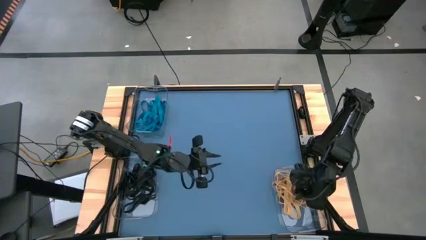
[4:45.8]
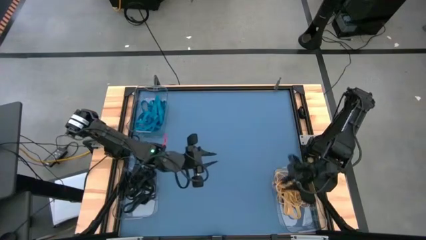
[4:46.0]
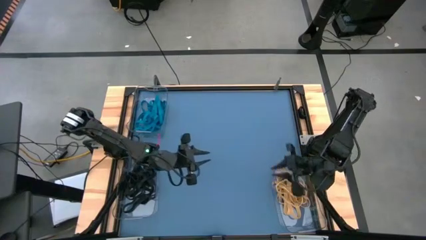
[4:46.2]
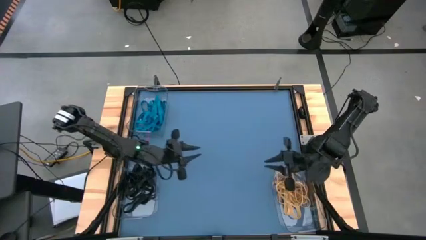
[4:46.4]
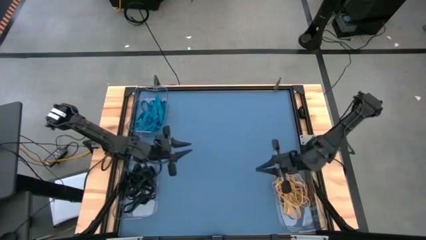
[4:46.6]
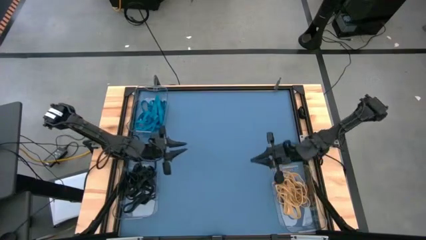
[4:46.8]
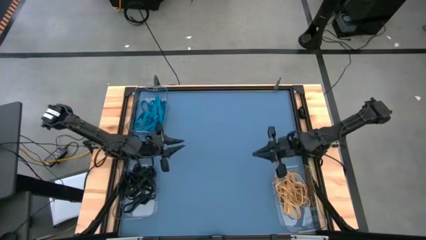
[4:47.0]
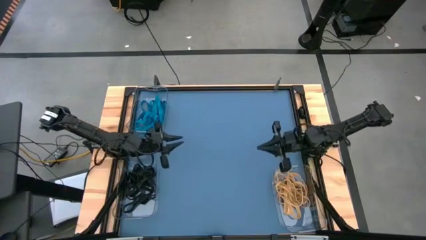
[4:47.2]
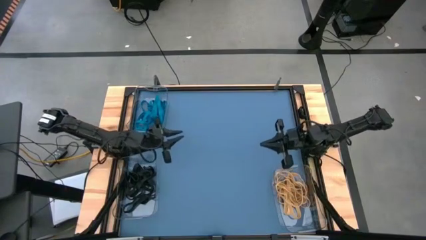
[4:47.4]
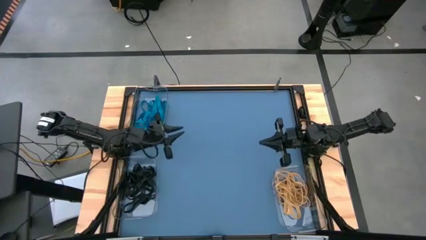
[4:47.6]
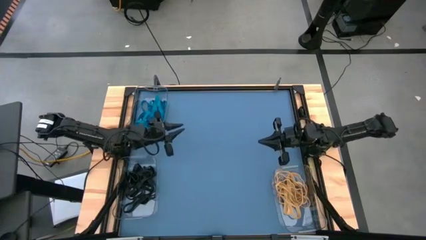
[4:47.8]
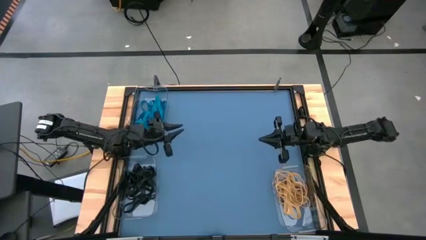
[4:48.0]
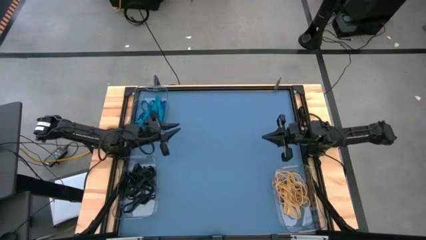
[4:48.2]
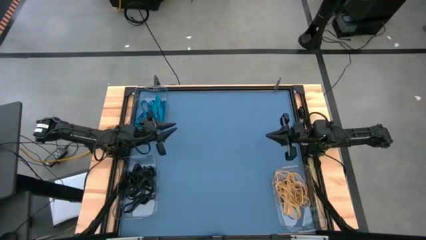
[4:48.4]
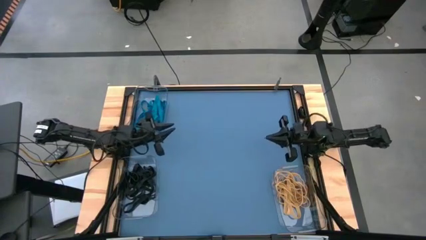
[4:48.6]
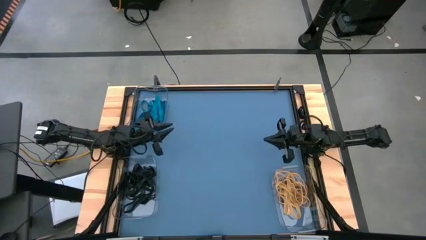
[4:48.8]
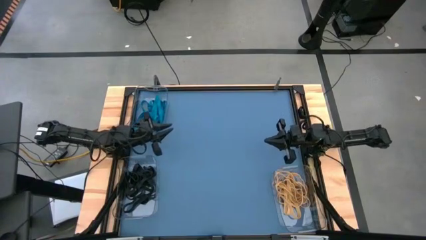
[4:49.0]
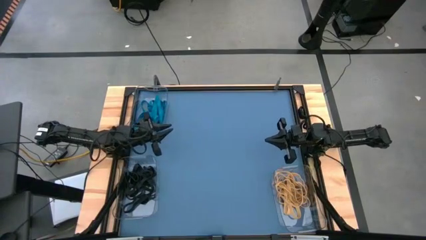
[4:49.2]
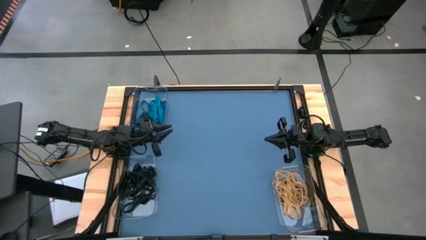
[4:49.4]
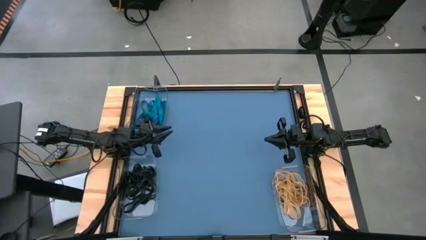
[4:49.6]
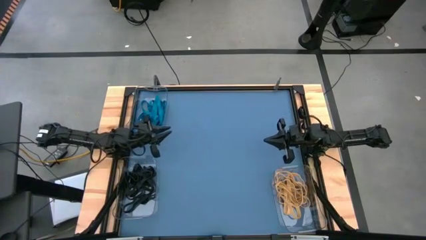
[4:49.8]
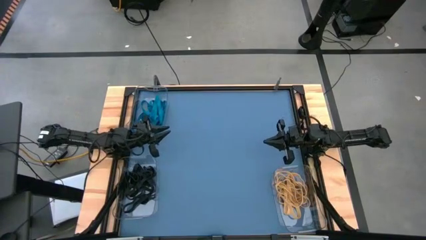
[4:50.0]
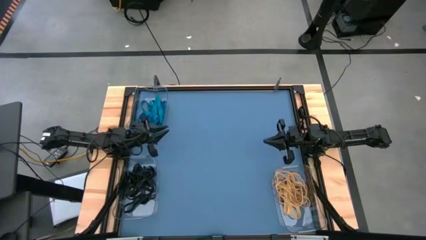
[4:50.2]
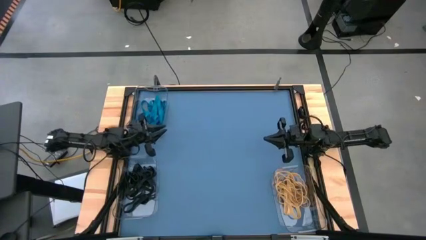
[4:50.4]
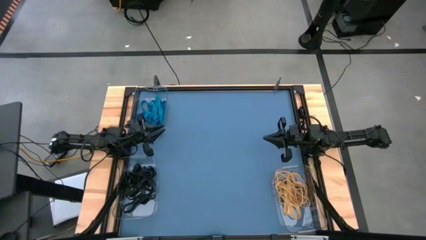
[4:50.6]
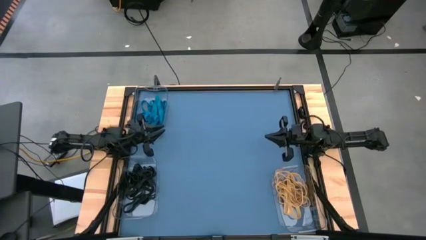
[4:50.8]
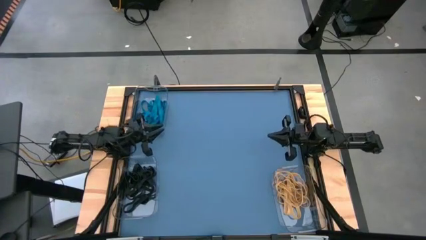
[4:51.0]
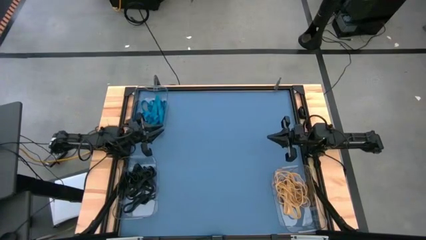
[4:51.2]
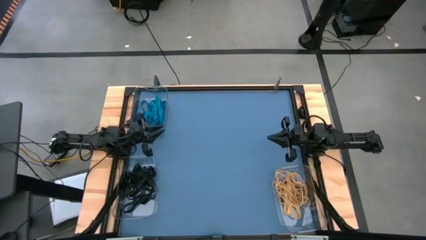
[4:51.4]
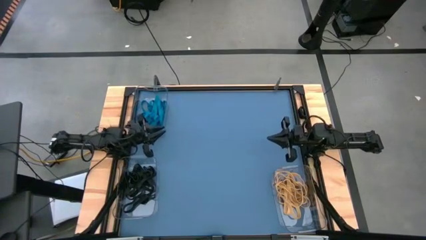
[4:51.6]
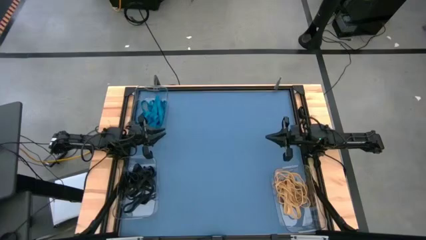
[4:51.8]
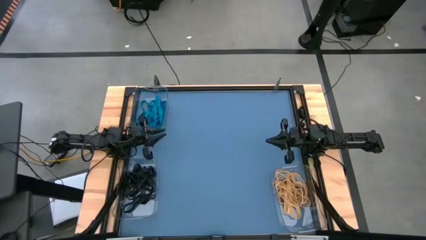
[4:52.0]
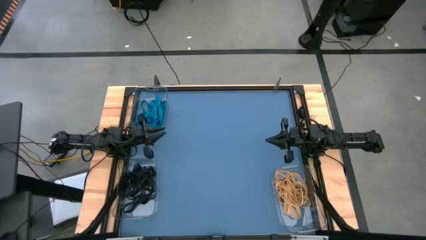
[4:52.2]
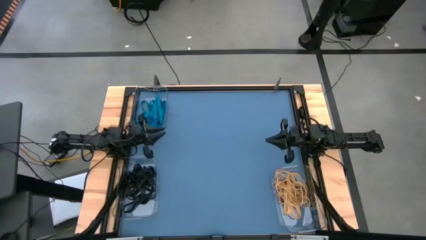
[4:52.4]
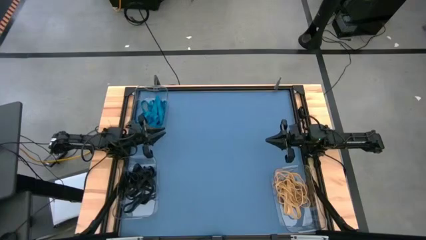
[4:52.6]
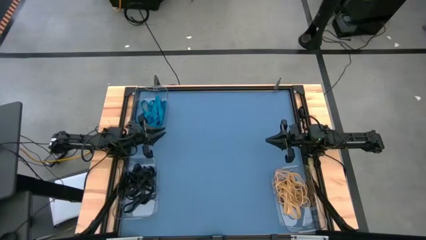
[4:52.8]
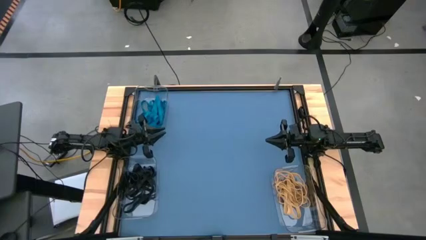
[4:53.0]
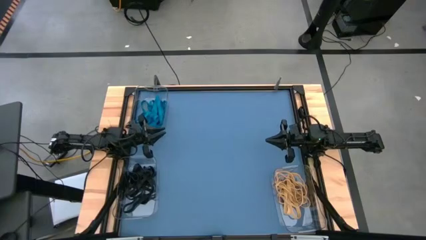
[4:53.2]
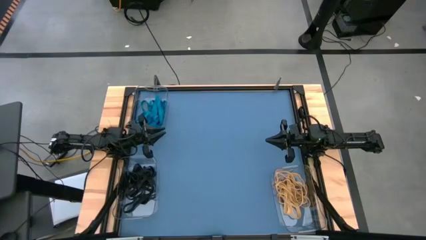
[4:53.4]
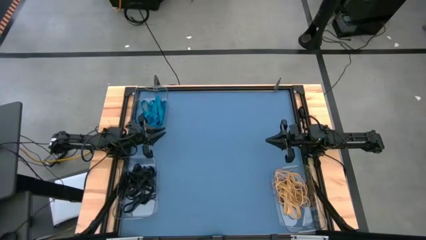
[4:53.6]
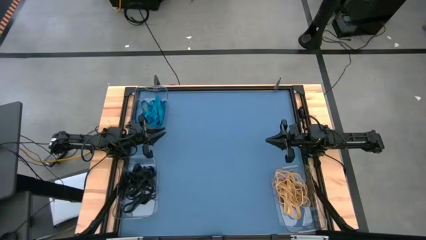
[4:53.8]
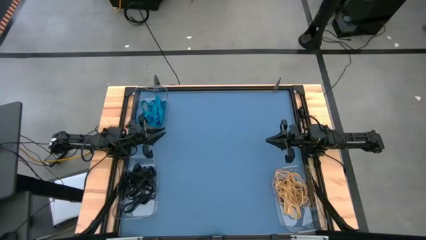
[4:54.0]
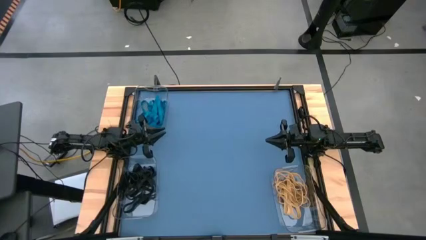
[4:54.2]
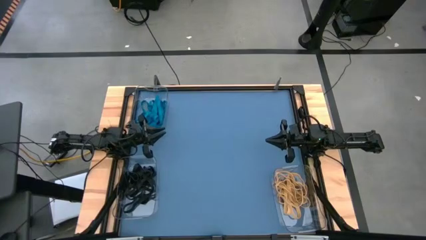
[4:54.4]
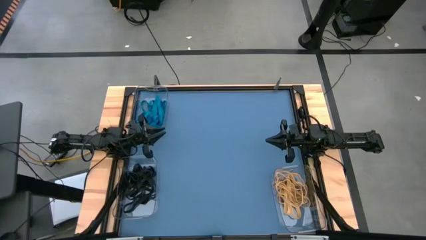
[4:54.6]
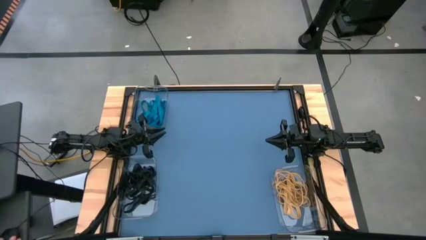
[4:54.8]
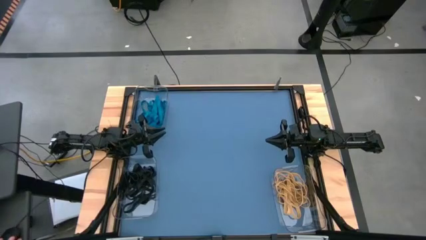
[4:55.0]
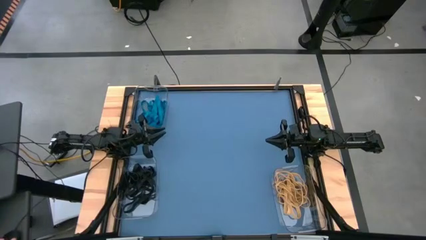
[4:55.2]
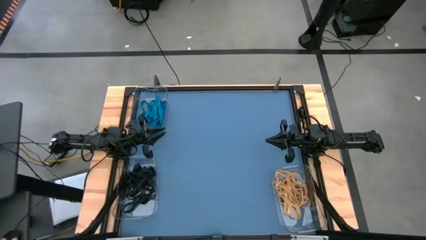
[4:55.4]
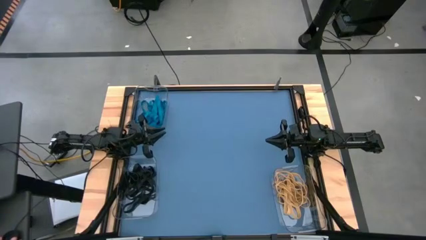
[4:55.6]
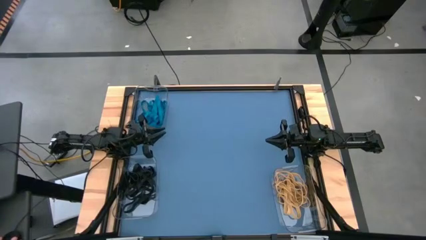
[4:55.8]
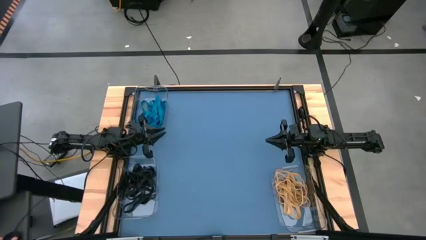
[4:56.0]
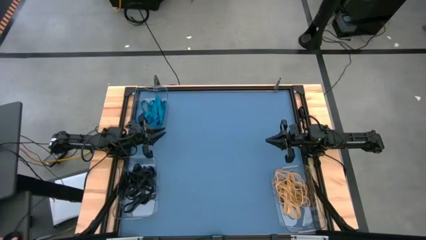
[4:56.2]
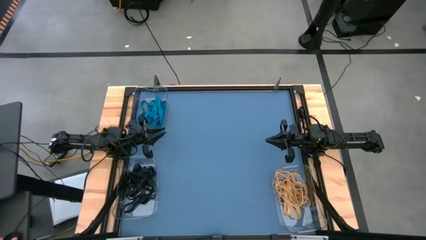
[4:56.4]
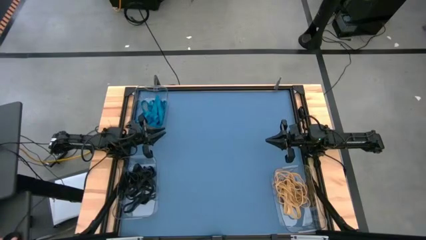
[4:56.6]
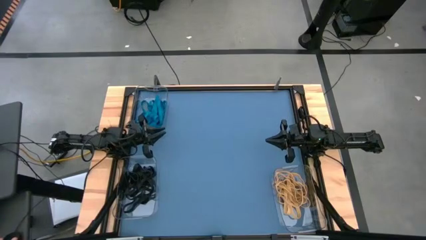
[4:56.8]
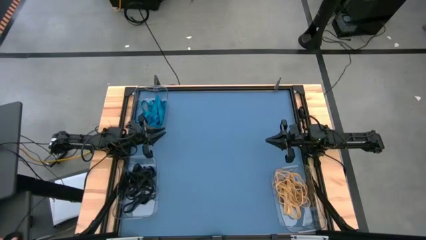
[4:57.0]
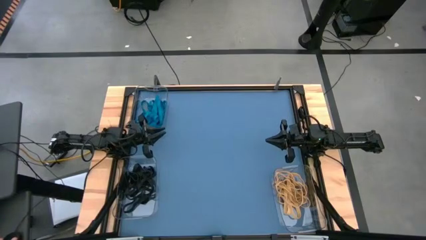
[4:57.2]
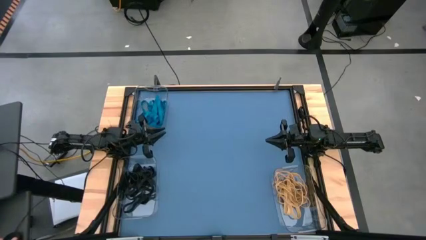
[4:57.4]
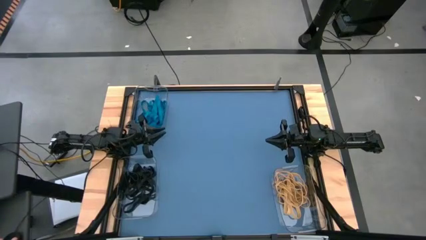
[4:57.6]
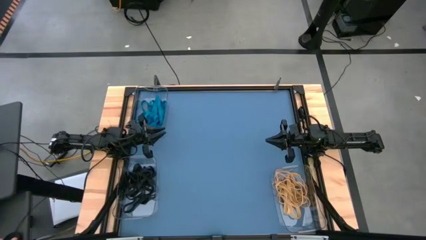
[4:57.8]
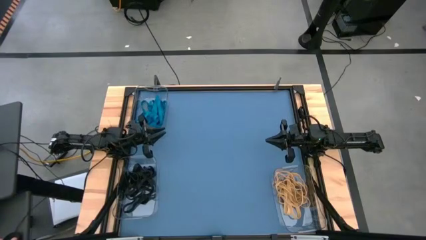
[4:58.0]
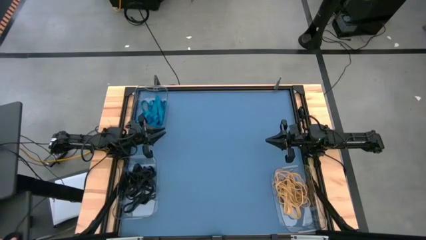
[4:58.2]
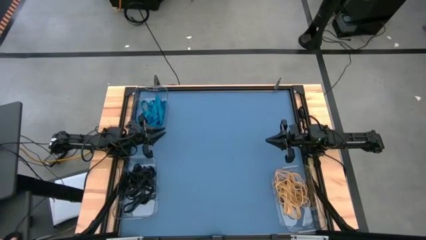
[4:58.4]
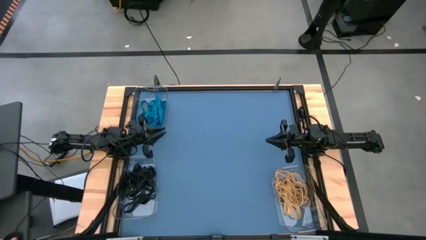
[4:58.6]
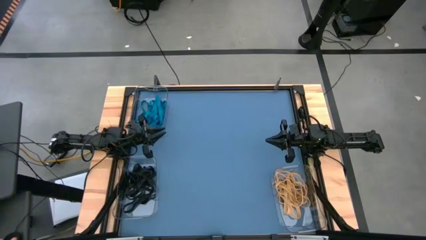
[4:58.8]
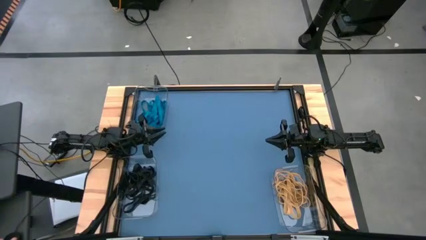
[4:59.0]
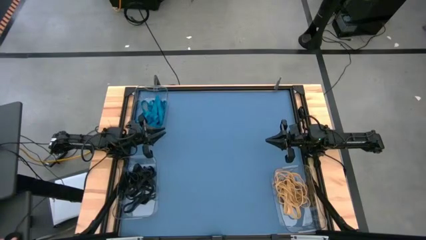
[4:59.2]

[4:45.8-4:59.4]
Task: Sort rubber bands into baskets
Return to Home Position
